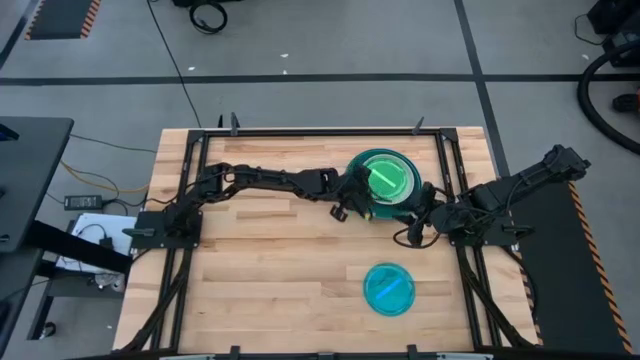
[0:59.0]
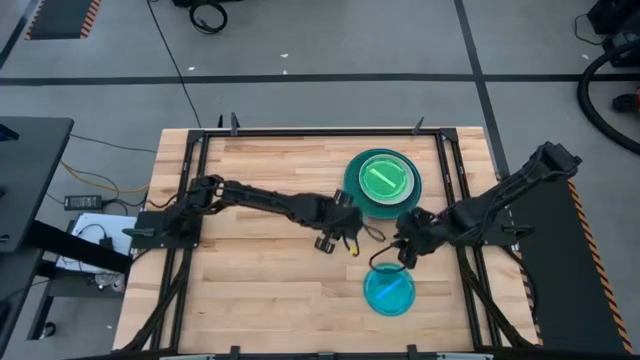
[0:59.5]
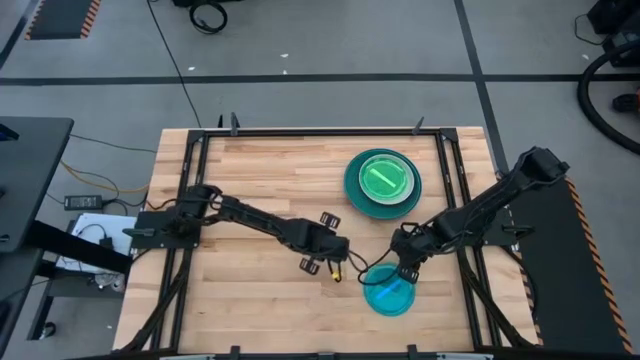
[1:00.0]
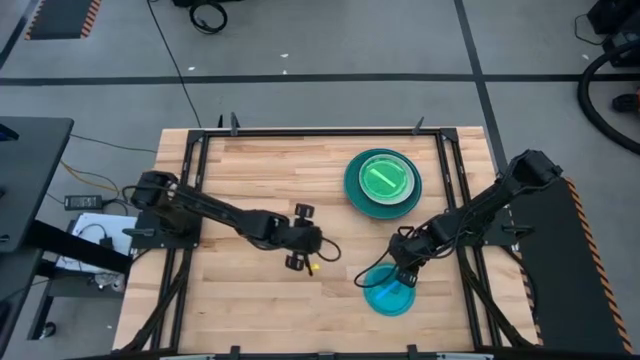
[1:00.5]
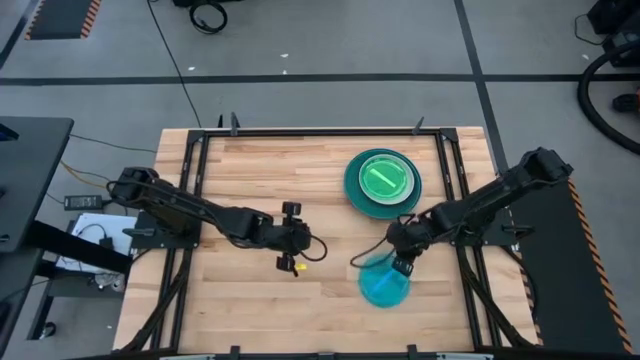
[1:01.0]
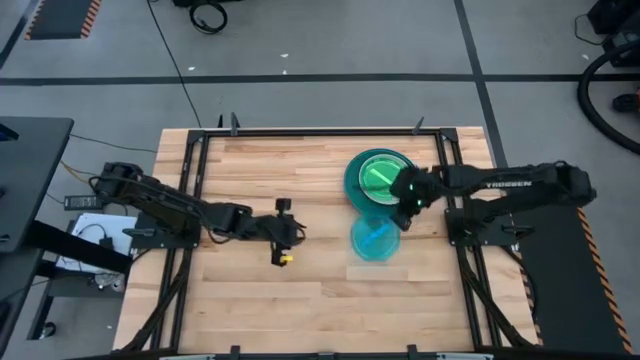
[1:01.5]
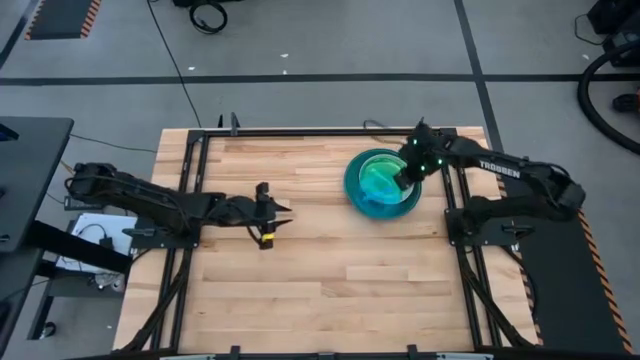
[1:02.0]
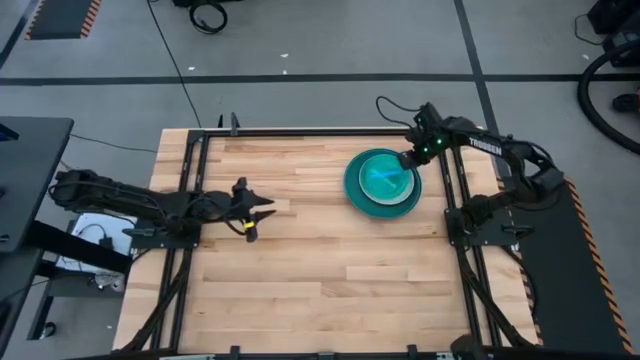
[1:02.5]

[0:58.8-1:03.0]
Task: Stack plastic plates
Stack the blue transparent plate on the green transparent plate

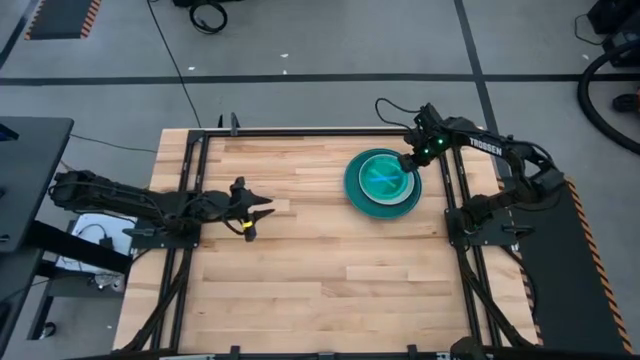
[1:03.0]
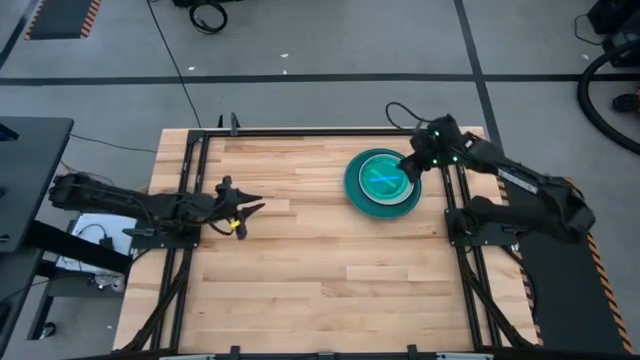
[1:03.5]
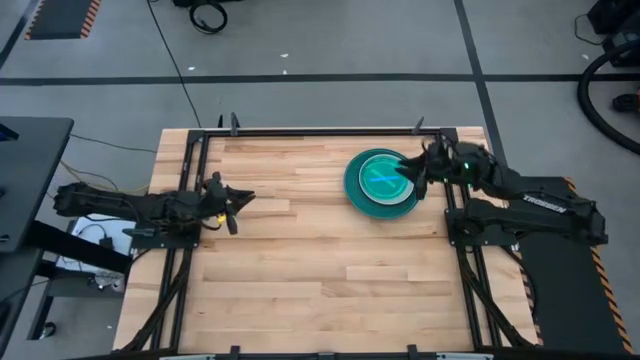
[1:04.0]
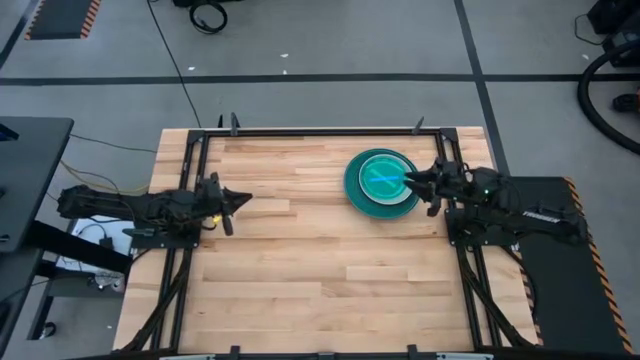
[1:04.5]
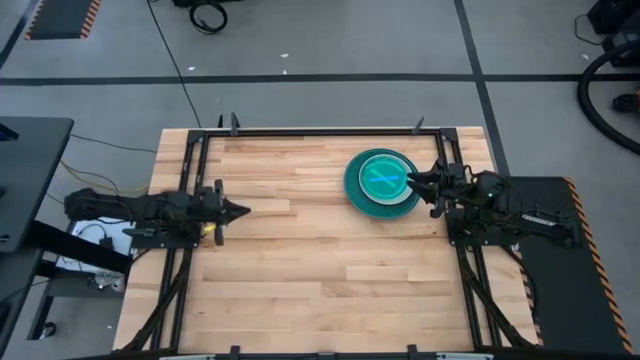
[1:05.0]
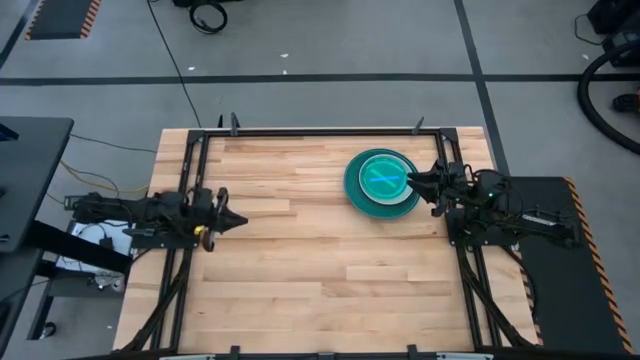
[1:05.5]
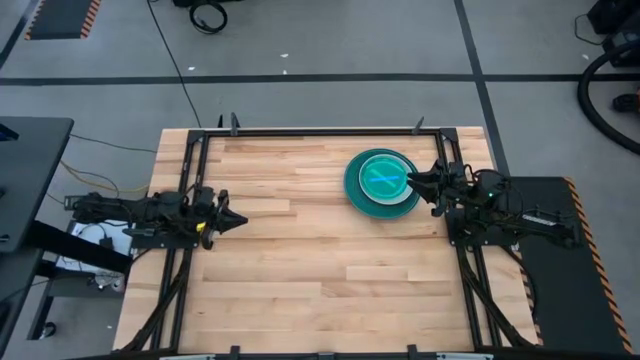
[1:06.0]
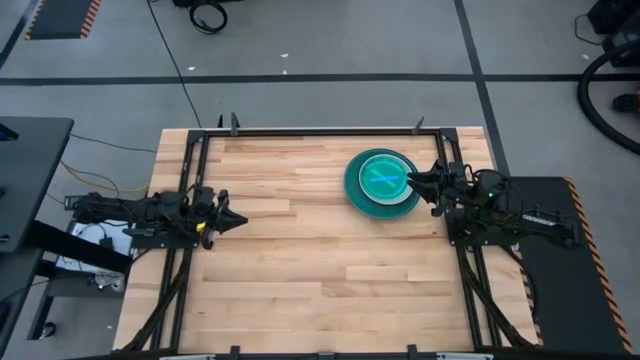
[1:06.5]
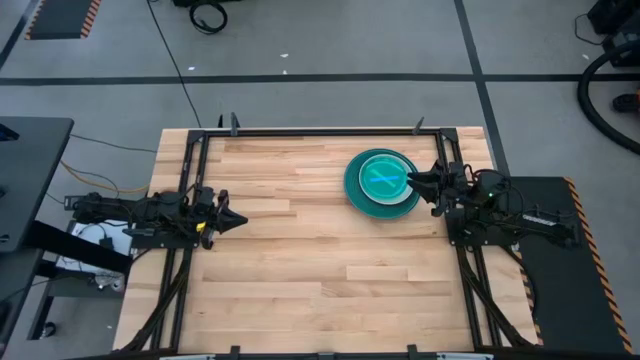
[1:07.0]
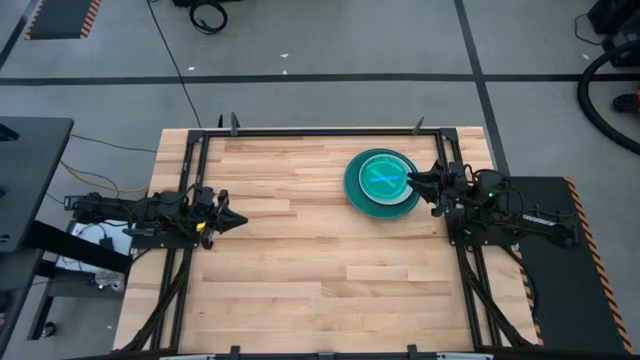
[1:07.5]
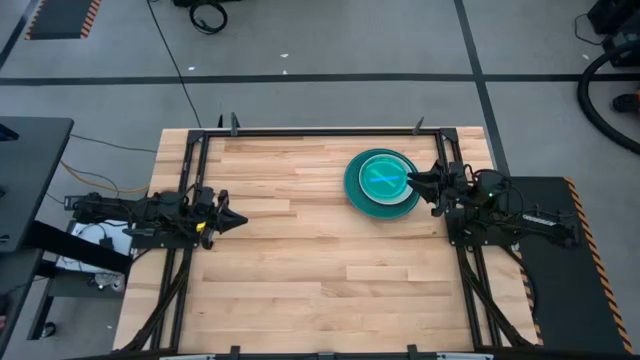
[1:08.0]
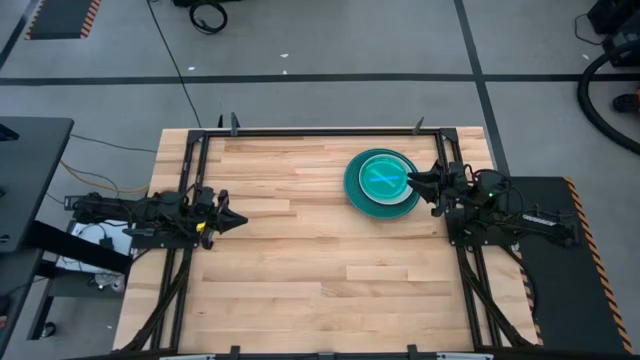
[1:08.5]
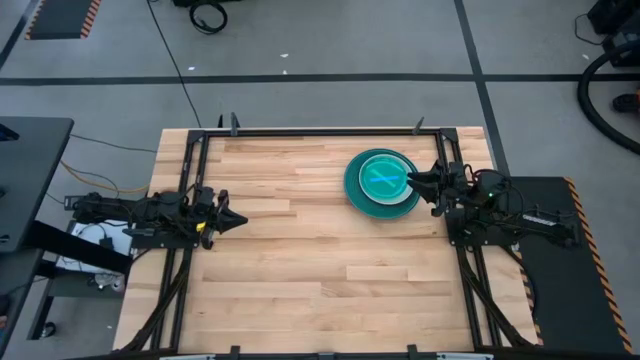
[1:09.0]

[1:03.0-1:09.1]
Return to Home Position
